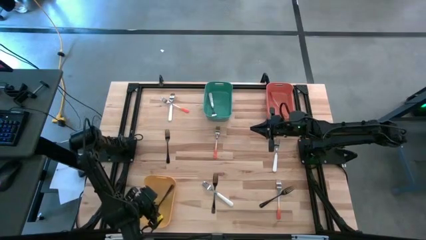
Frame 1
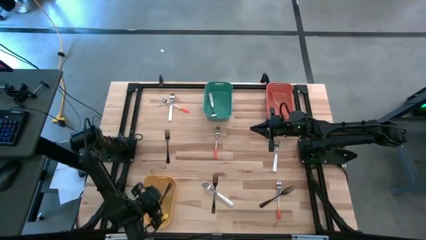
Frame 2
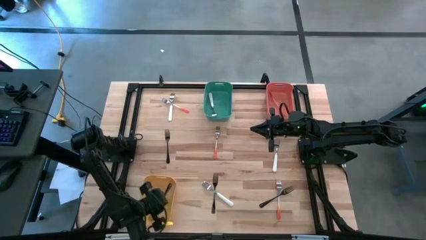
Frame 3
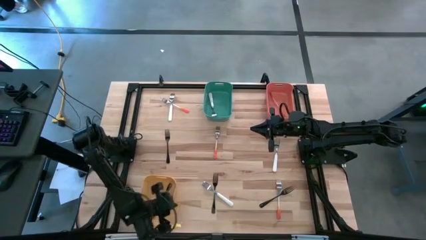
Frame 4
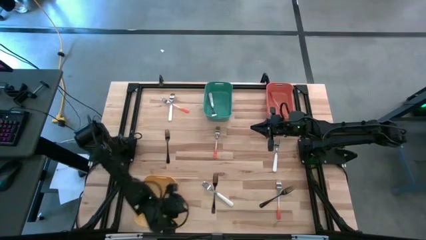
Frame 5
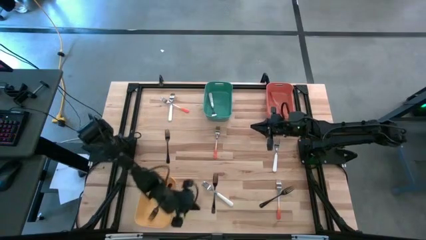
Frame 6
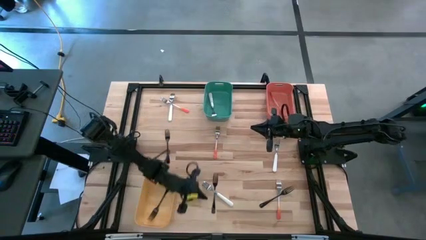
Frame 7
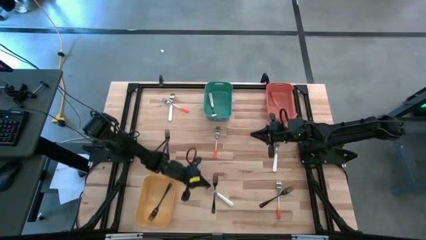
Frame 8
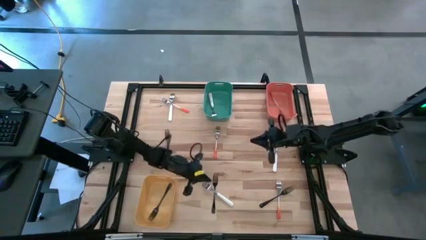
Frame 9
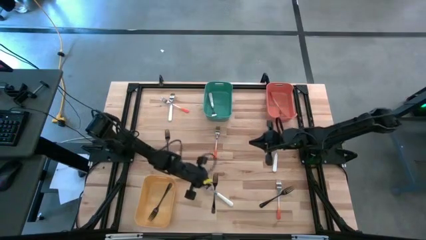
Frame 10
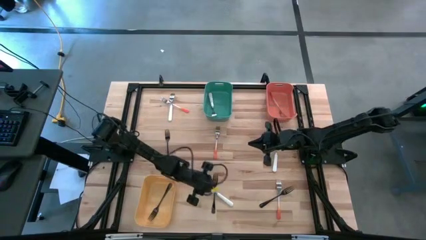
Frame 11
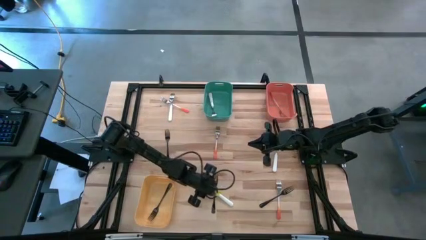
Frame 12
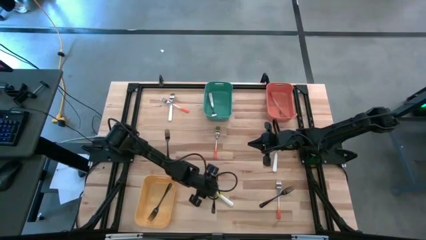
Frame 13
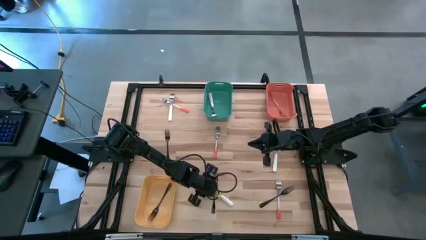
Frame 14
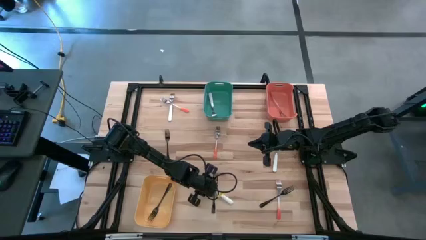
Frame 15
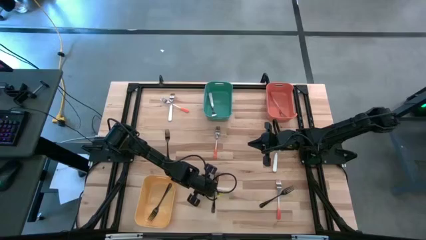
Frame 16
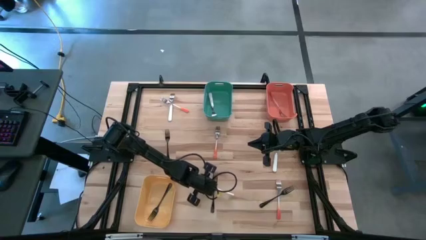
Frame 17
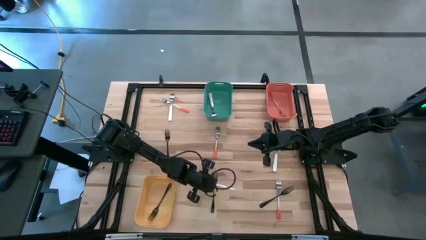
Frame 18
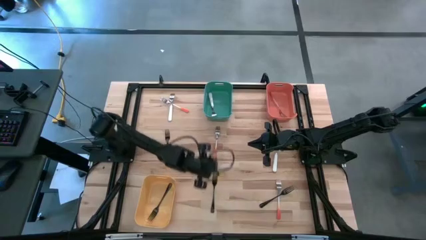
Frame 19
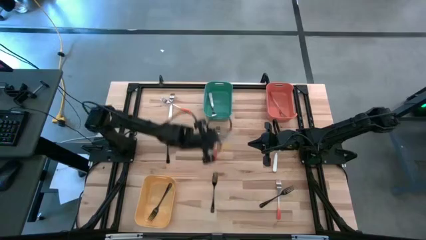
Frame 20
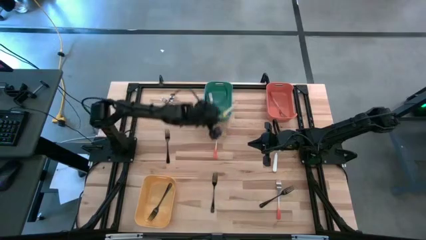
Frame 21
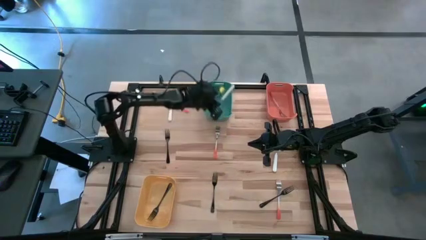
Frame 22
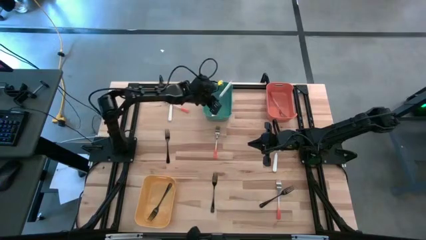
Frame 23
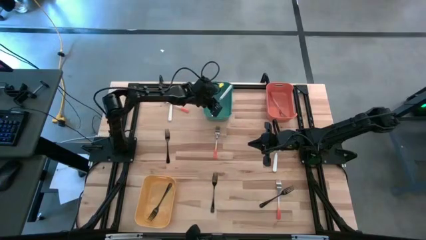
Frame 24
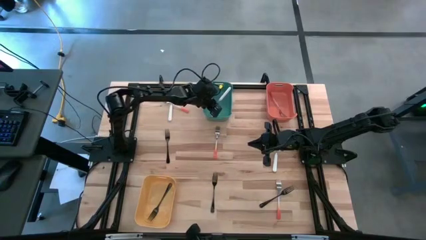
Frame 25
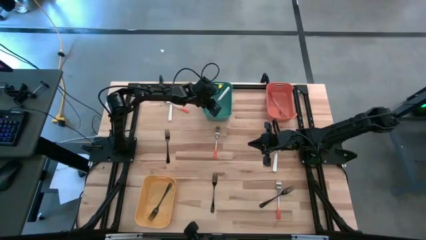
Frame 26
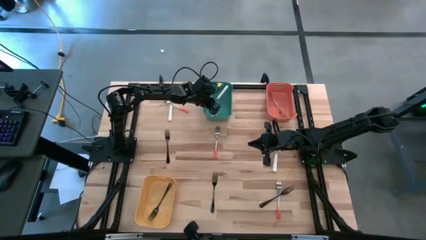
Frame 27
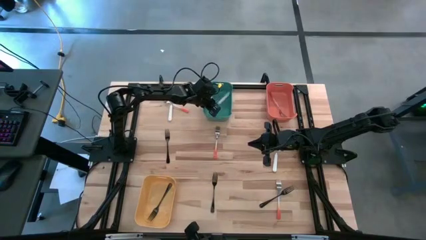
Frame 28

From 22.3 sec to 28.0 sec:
Task: Sort silverware by color (type)
Put the white fork into the green bin

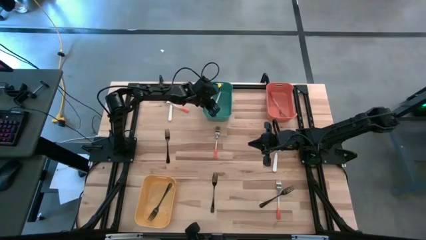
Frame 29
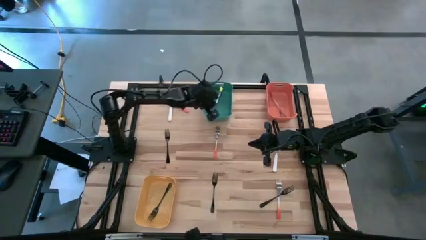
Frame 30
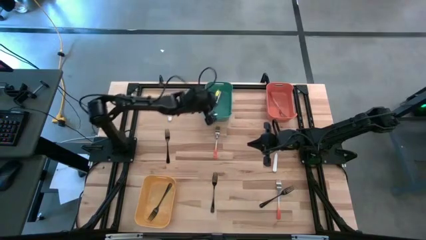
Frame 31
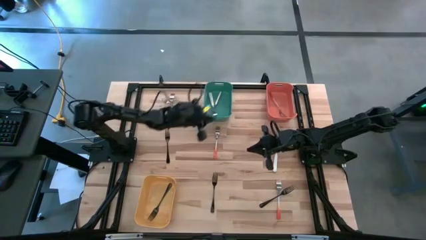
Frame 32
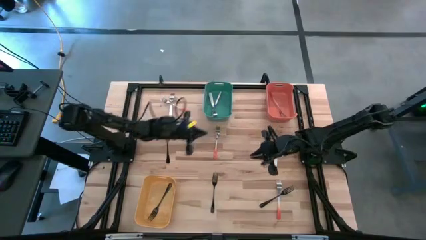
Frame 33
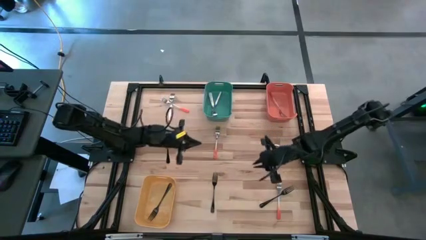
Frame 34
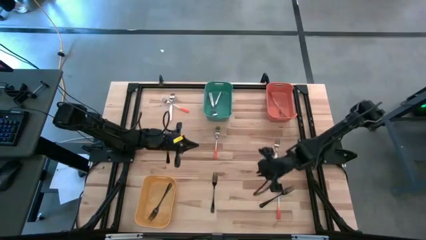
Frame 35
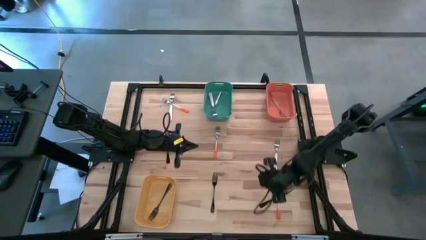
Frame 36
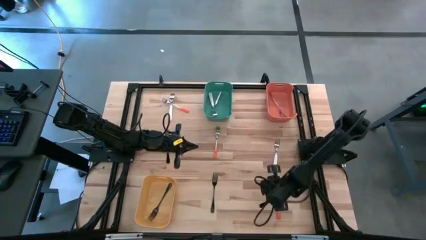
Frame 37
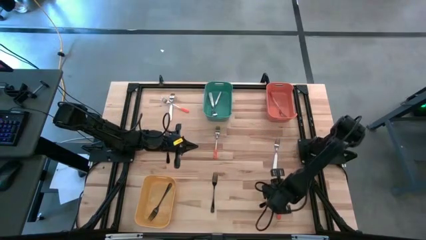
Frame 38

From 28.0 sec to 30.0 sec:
Put the black fork into the yellow bin

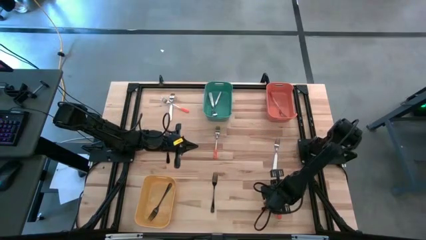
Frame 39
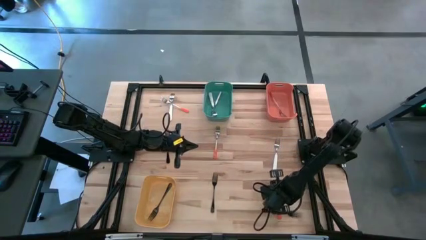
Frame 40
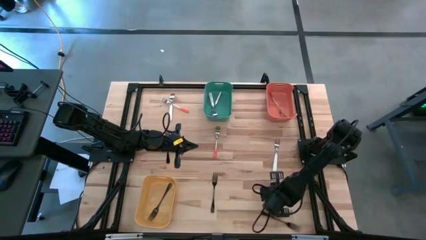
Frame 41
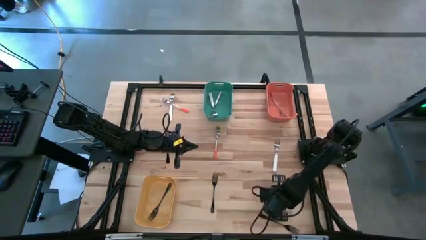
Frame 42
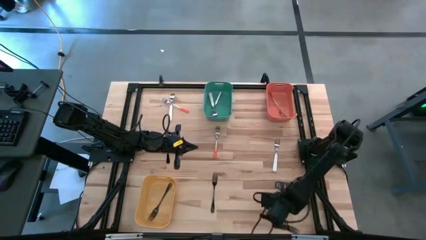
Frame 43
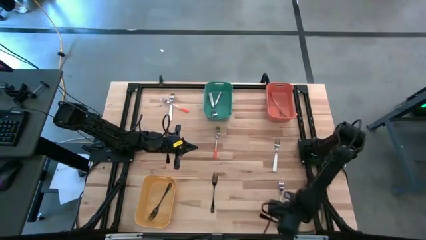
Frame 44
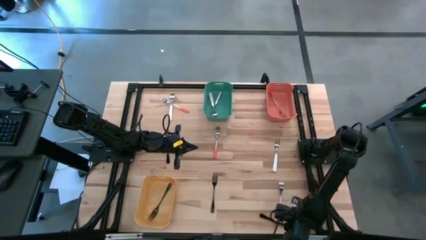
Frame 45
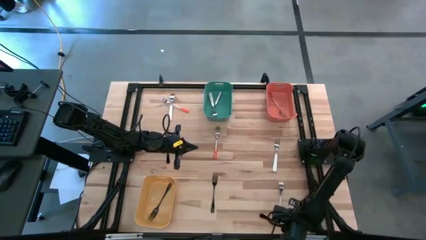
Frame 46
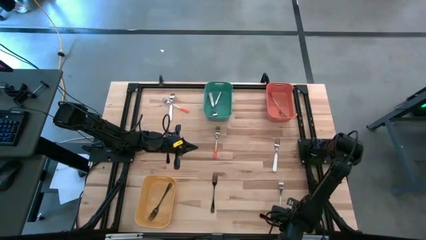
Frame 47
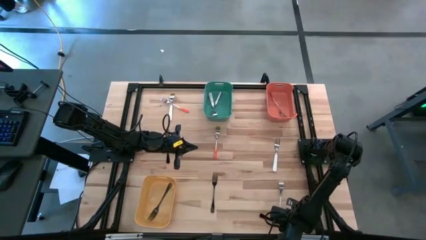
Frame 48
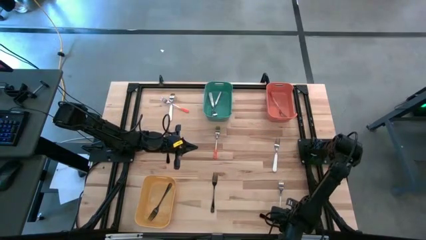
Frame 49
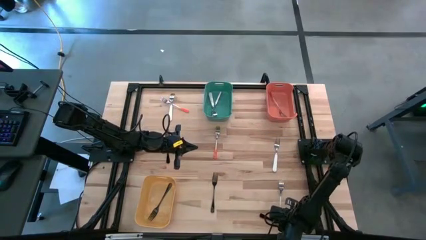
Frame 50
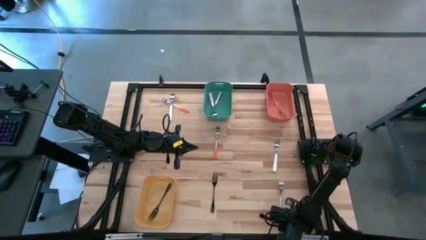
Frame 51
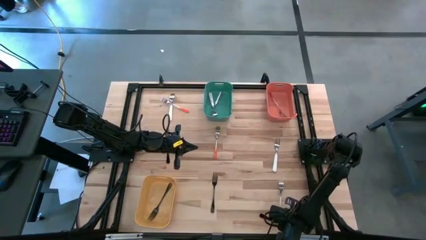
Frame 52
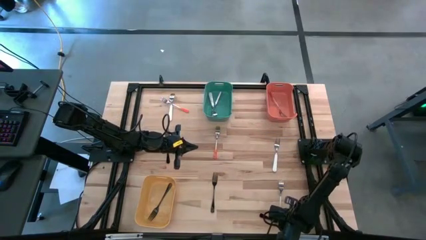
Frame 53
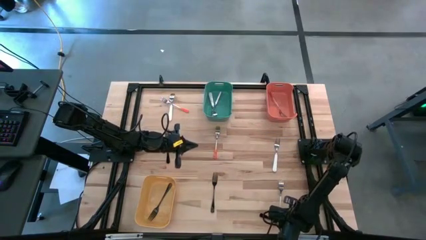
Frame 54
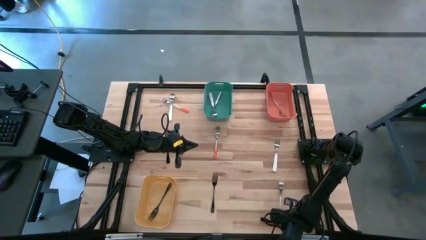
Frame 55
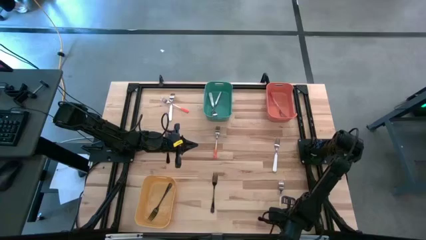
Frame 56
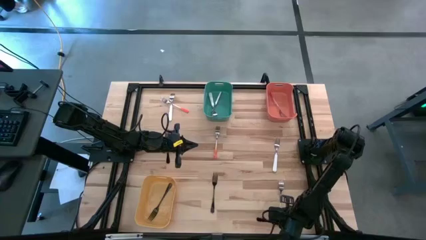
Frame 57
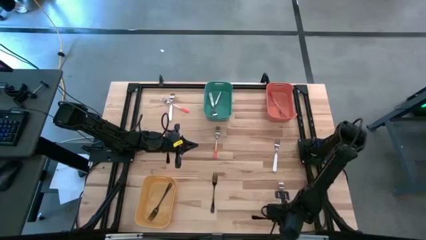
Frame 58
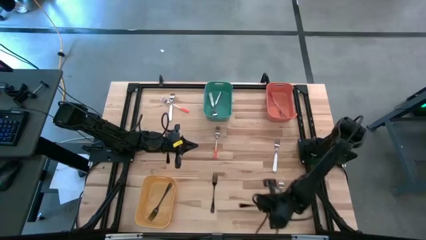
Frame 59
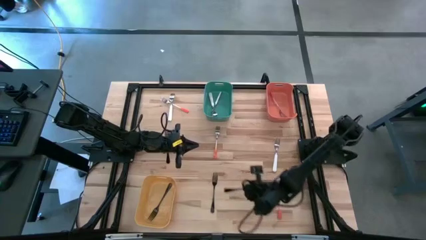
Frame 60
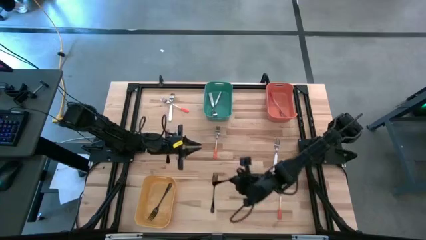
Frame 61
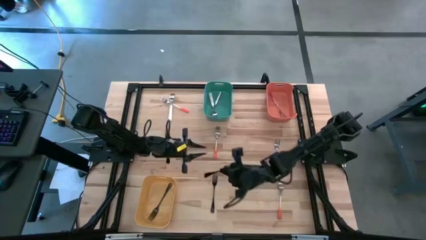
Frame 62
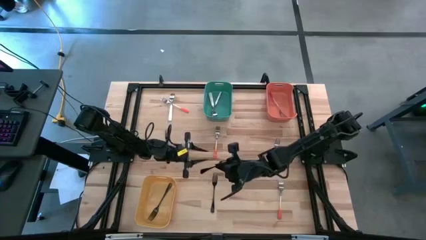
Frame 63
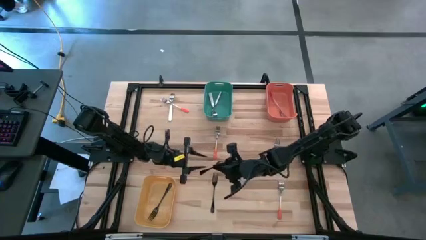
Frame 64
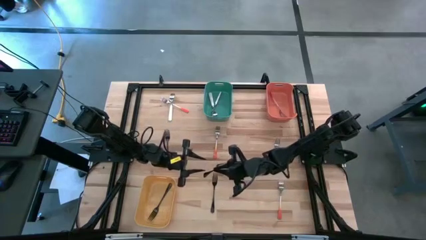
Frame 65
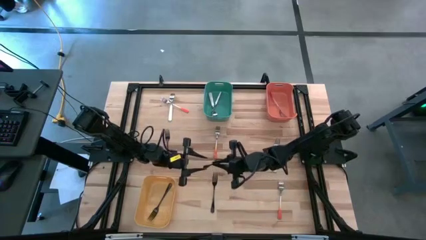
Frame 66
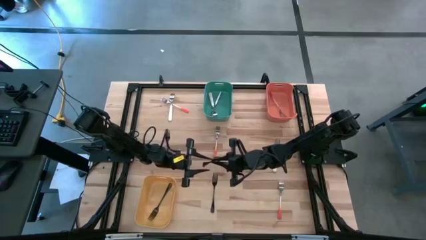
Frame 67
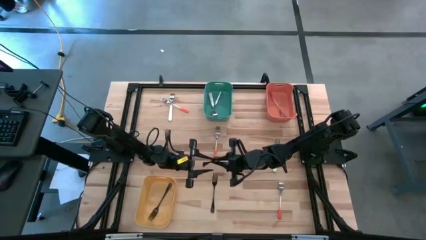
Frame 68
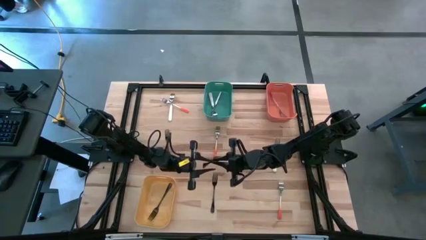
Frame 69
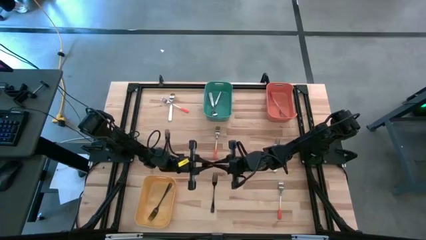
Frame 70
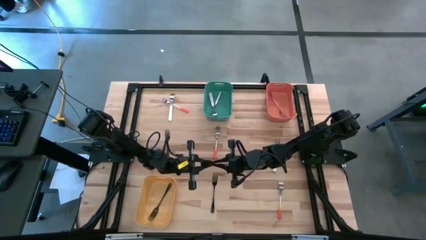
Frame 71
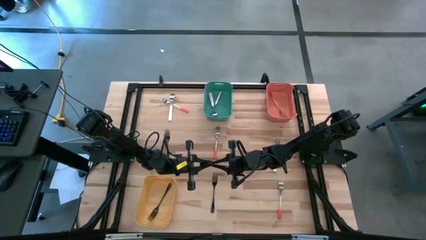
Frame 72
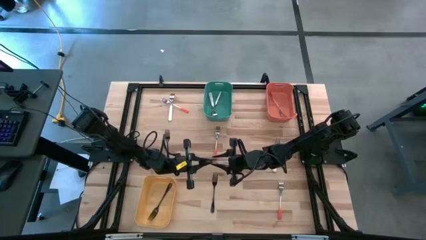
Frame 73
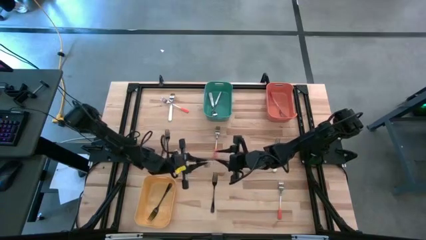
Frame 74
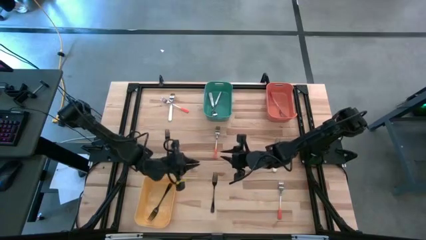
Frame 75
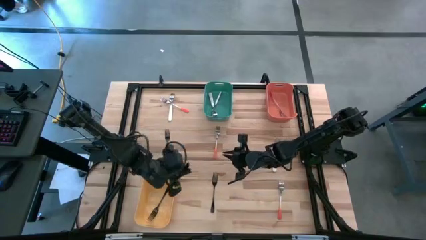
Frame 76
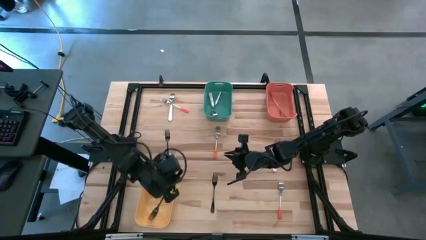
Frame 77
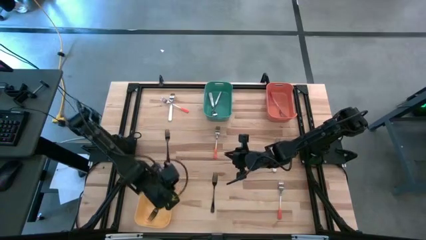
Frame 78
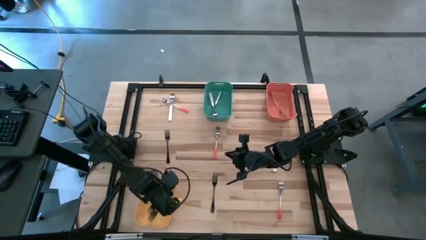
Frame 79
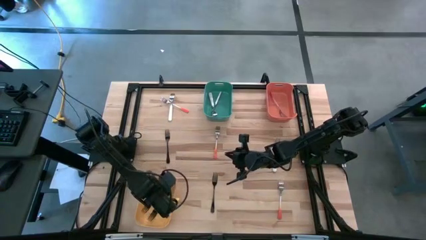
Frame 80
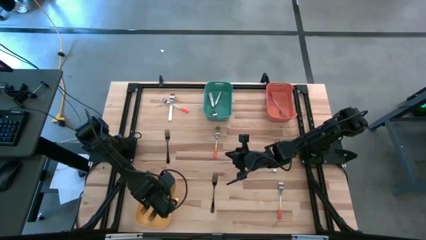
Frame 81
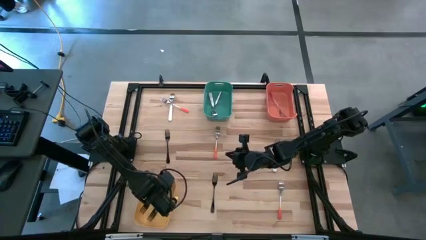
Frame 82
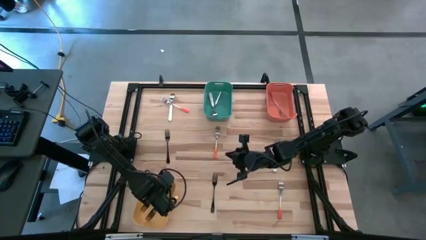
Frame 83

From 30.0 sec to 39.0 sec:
Put the black fork into the yellow bin
